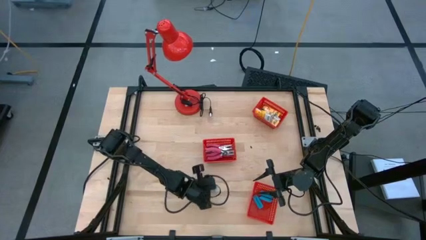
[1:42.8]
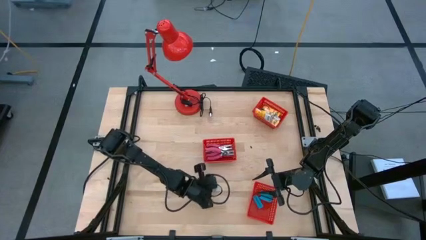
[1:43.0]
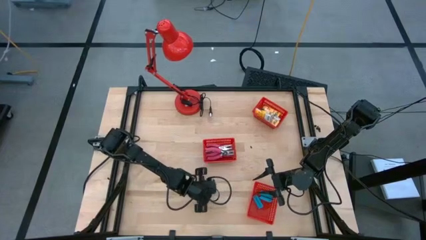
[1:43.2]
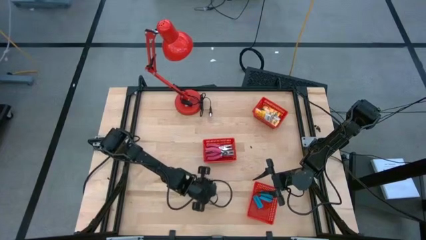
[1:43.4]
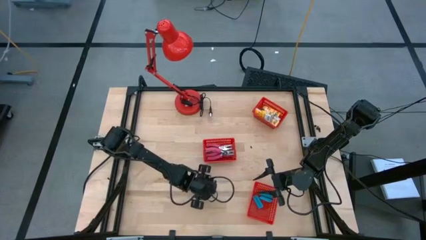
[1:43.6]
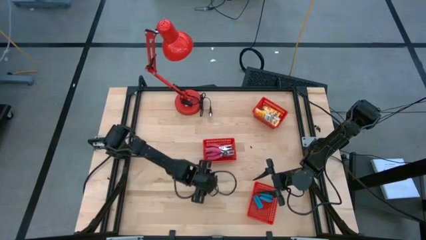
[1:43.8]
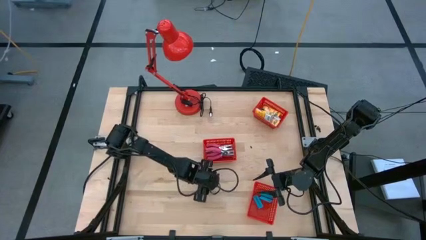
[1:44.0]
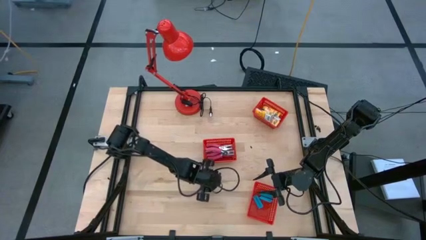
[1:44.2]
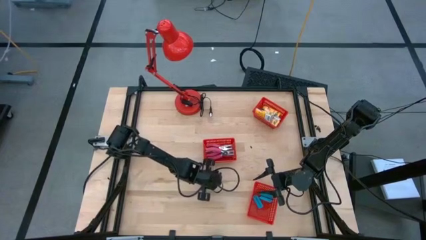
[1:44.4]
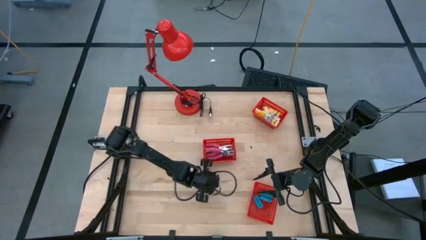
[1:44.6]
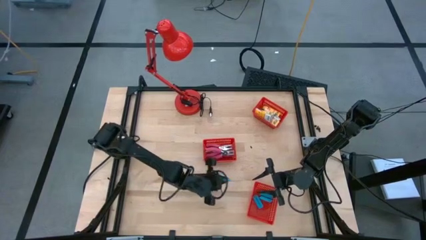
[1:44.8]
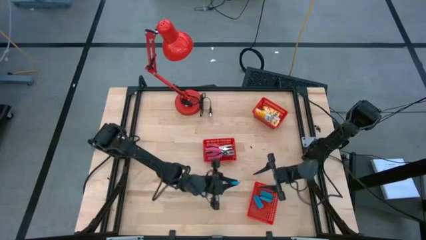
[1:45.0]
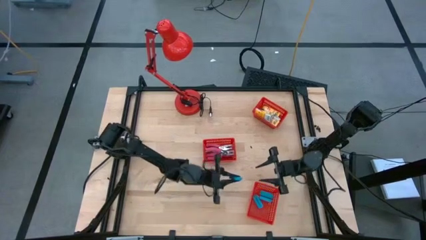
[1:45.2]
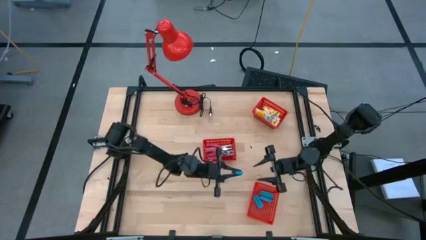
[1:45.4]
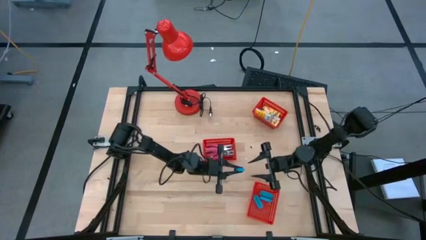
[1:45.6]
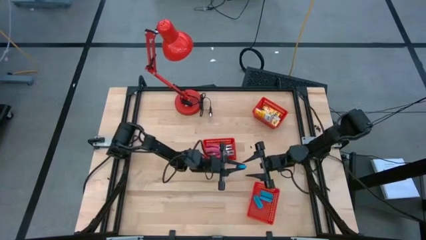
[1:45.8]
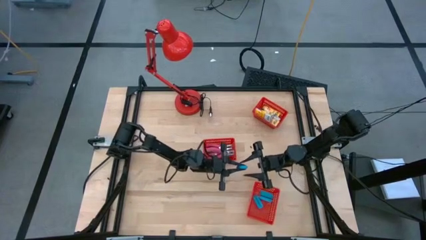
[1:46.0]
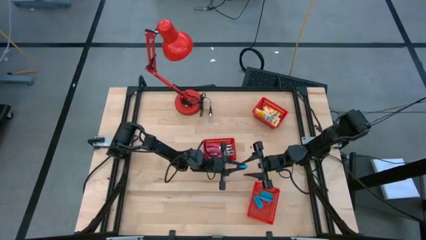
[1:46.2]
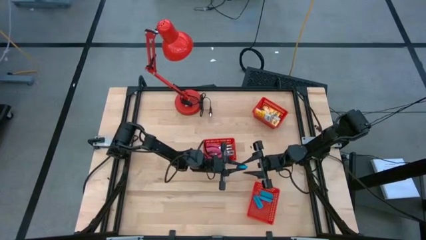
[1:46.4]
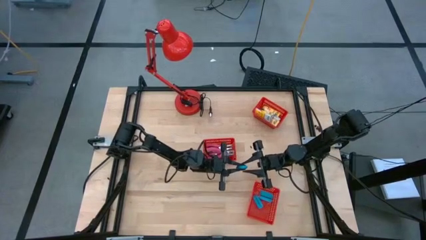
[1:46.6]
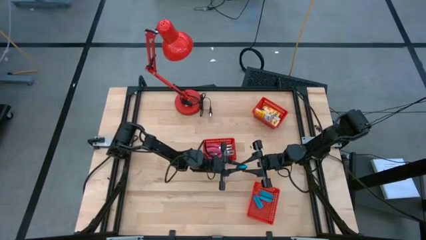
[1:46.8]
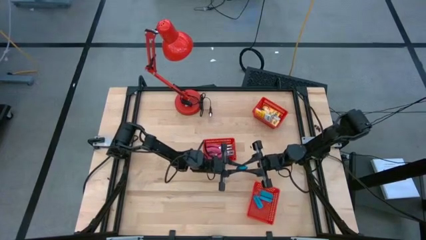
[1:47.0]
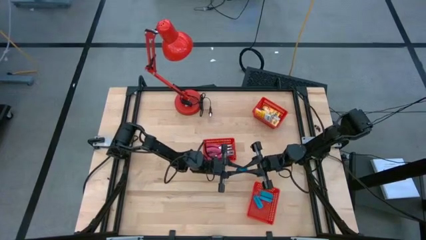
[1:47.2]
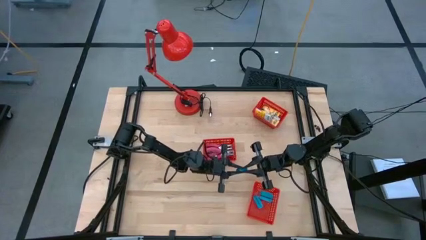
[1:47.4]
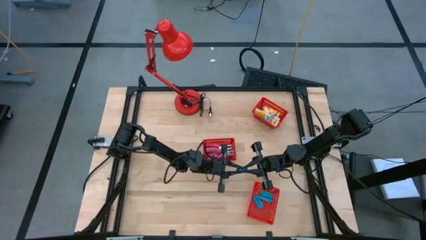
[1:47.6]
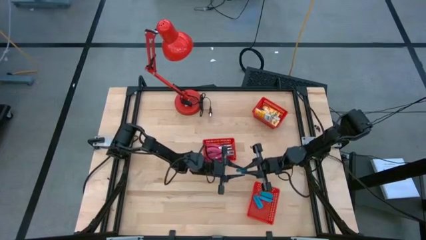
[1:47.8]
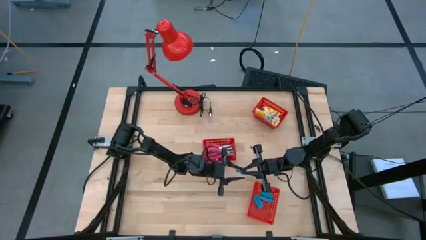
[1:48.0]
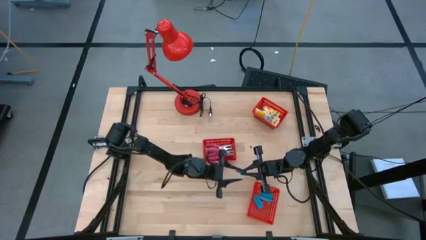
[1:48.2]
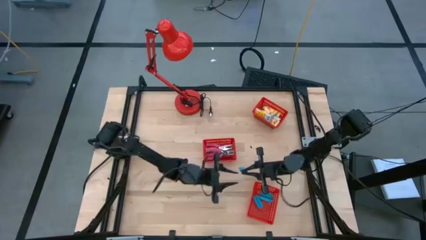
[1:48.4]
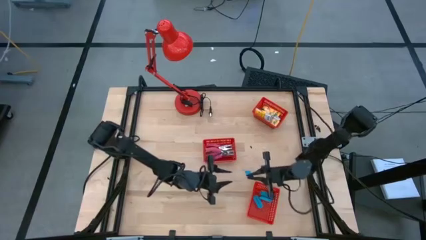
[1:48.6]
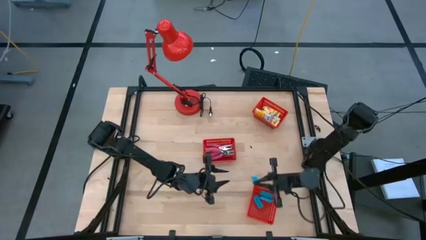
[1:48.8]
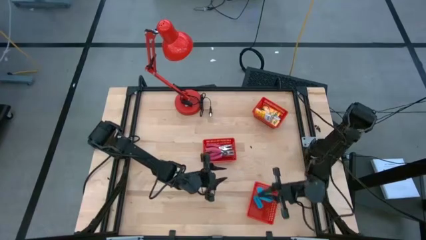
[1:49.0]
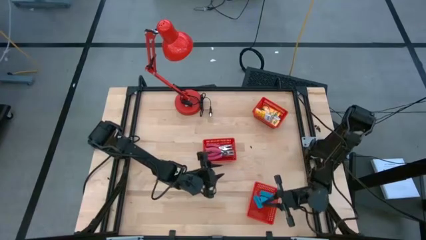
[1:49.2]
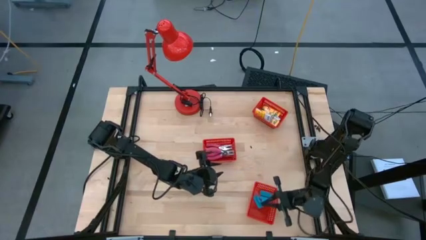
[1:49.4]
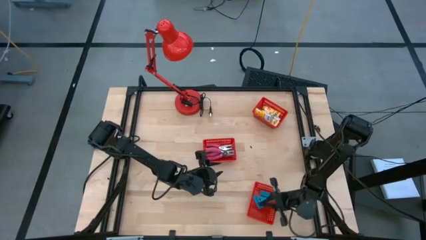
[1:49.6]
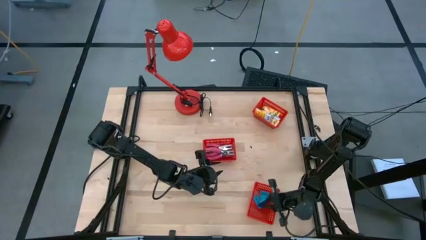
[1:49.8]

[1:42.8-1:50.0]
Task: Pick & Place School Supplies
Put the blue eraser into the bottom red bin

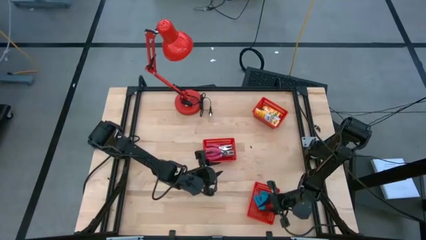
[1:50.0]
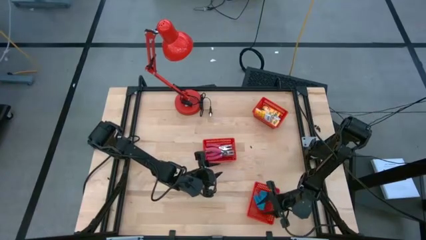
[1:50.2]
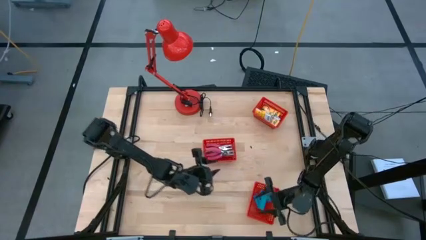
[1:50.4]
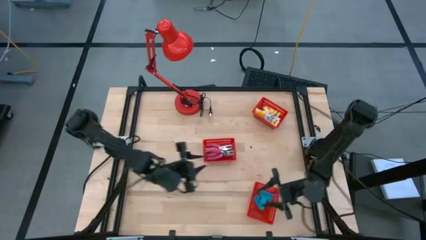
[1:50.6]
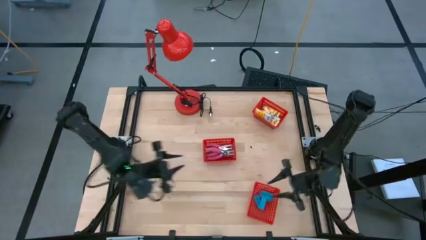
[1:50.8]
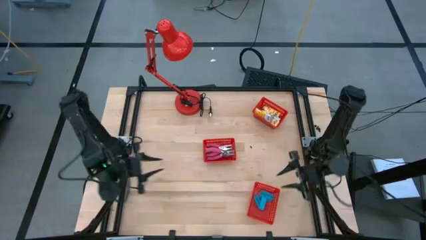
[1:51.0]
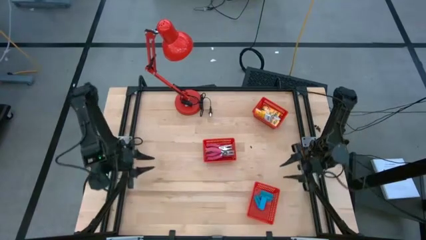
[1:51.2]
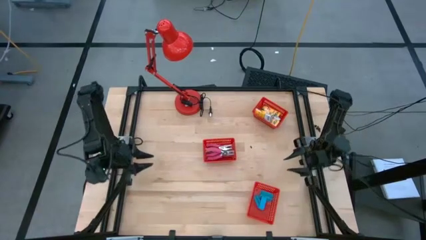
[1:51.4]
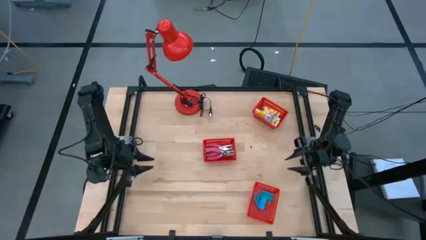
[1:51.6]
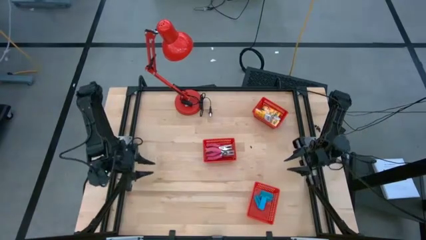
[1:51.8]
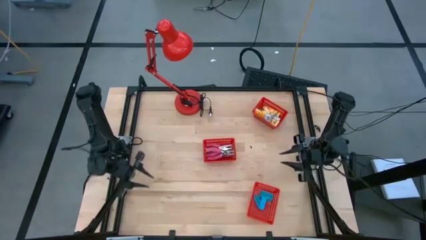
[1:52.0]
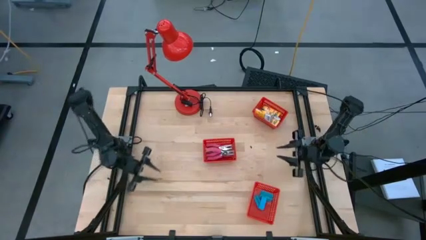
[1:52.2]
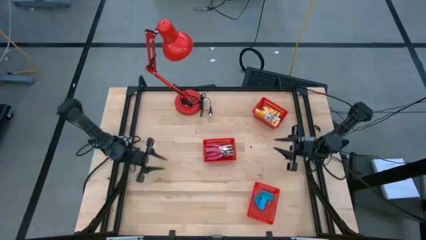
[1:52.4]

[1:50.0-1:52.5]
Return to Home Position

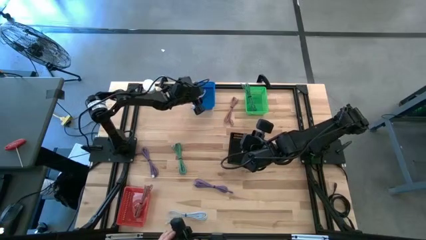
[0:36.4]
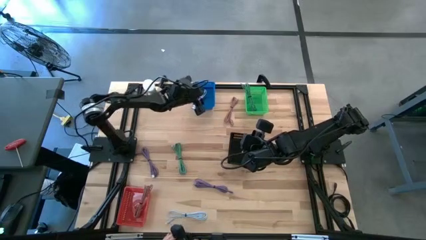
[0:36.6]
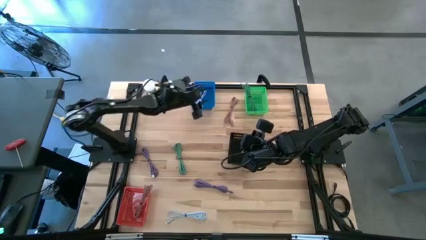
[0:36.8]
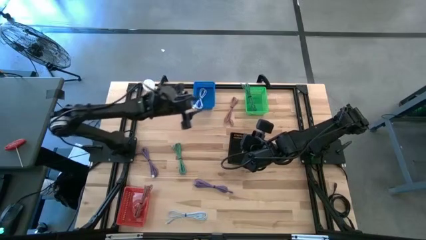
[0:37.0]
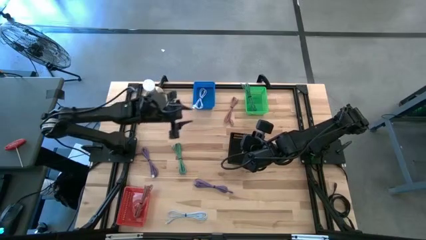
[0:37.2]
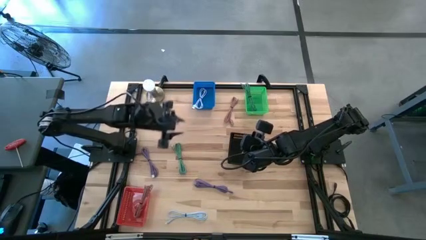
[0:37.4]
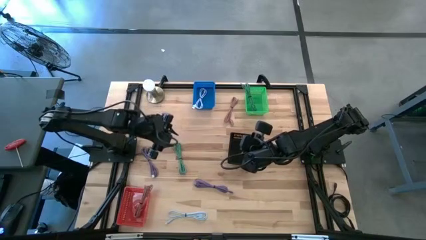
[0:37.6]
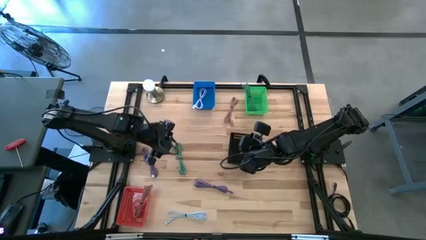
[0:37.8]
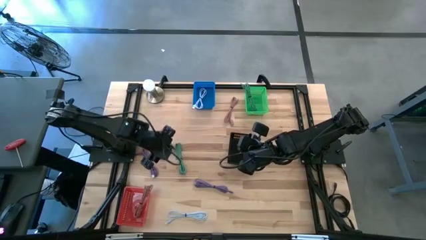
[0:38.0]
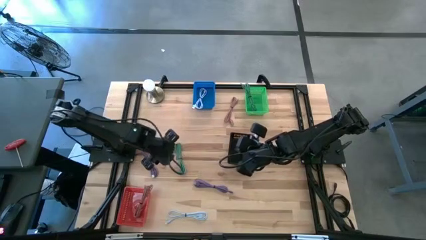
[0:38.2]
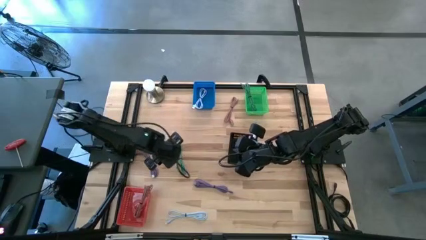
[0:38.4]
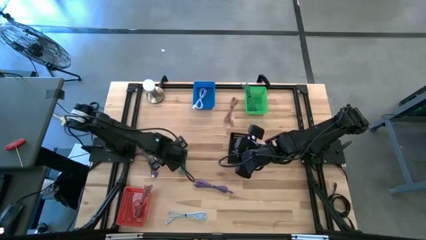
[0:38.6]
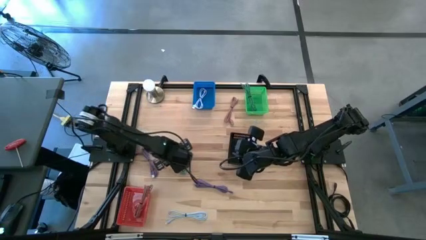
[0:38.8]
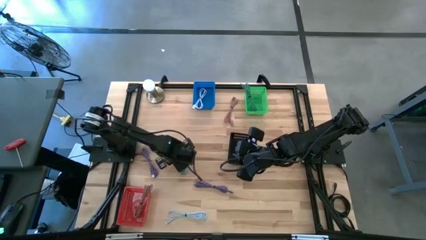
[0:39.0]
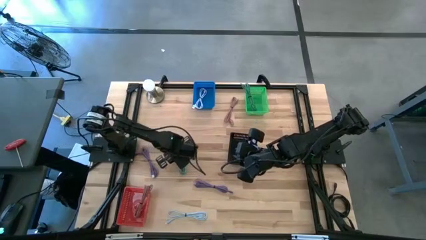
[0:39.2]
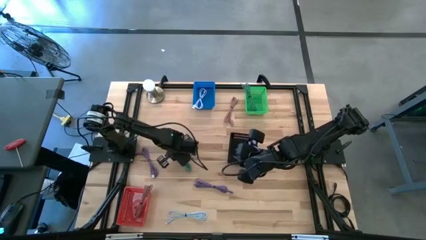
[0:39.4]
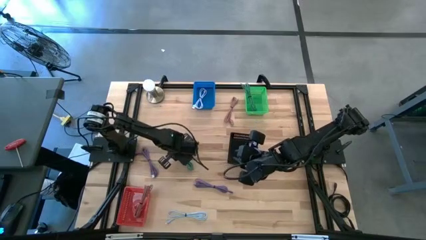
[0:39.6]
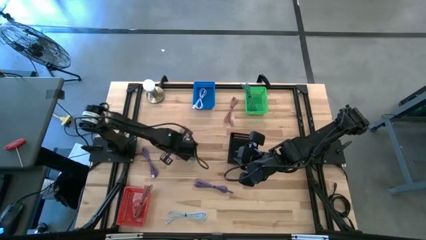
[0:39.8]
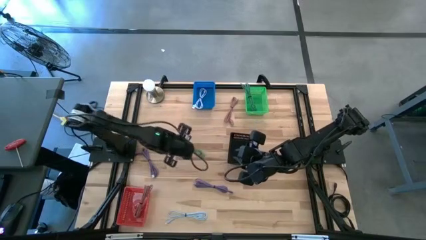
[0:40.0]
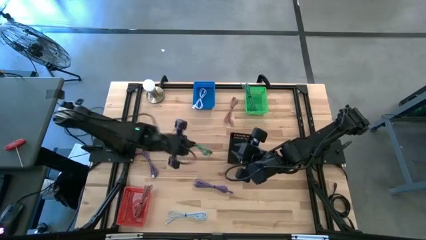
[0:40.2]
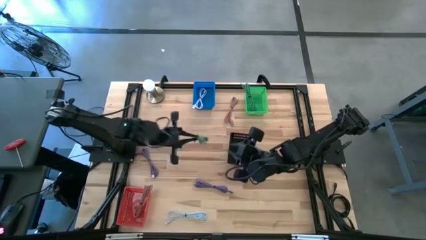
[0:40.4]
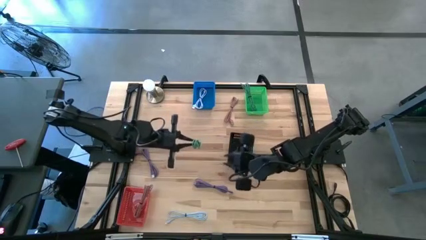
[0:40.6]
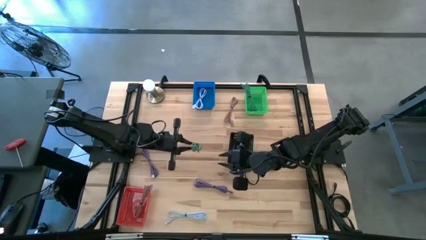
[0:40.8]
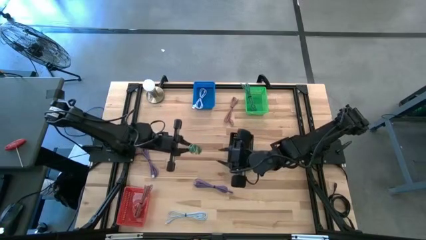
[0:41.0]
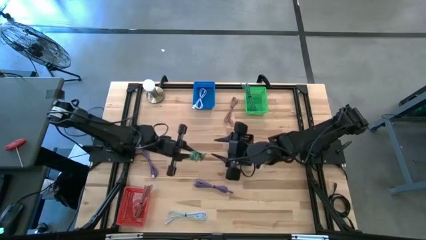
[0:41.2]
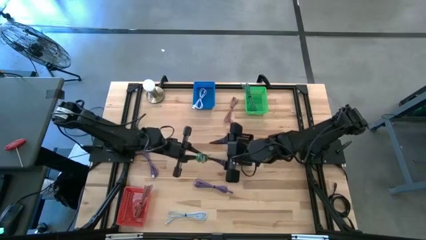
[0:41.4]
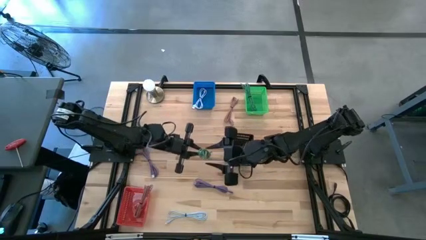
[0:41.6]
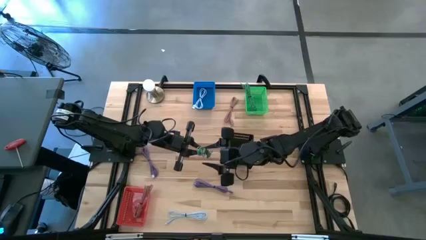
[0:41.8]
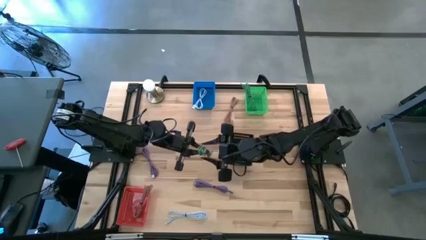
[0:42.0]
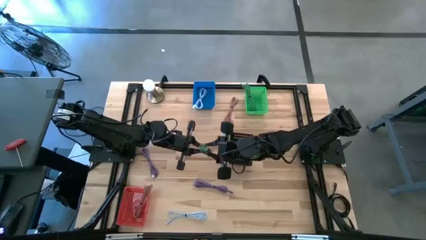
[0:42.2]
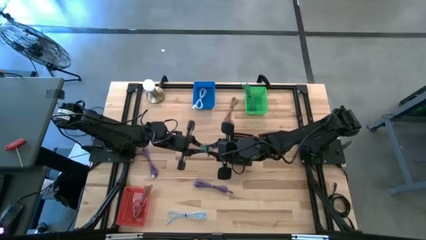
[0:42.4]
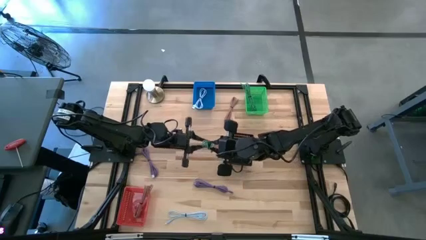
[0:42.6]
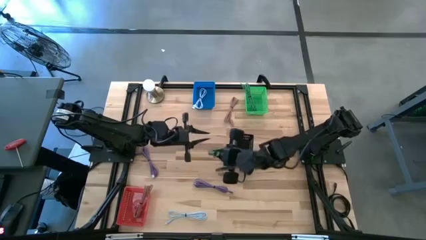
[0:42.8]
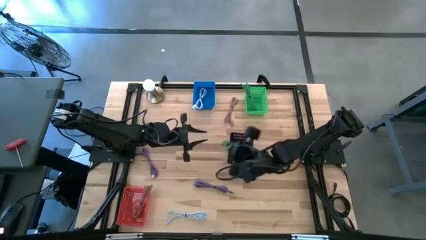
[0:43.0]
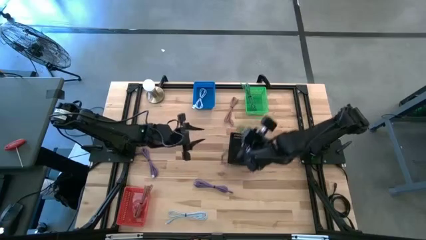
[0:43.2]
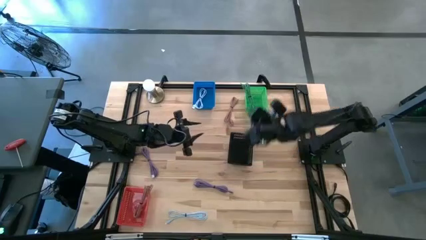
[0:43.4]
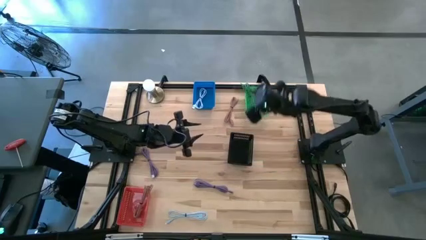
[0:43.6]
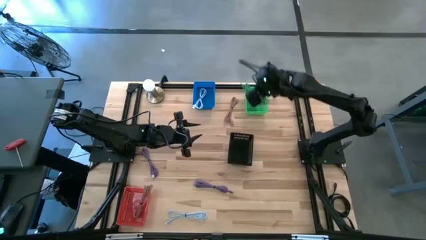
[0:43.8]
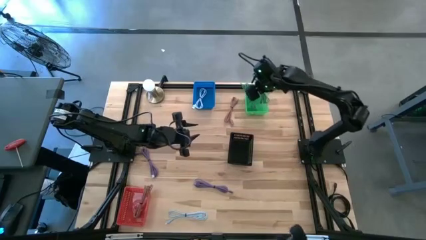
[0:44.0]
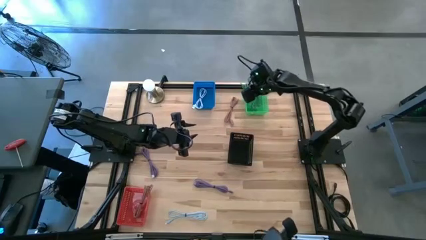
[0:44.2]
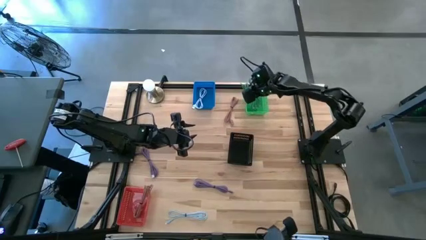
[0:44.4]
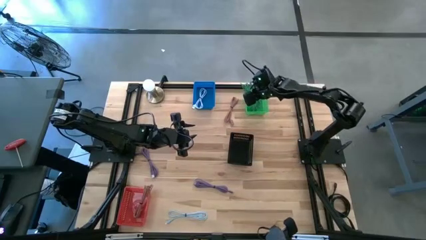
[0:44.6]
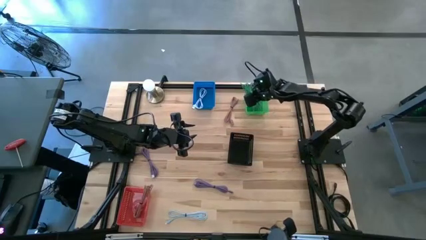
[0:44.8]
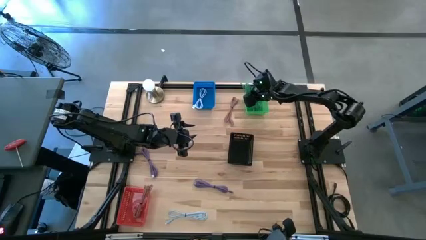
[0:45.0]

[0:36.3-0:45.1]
Task: Pick & Place USB Port
Put the green charger cable into the green bin
